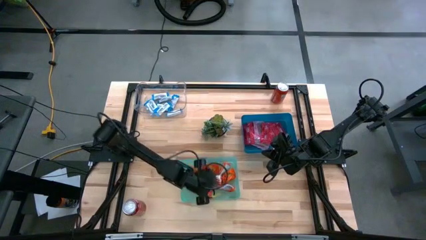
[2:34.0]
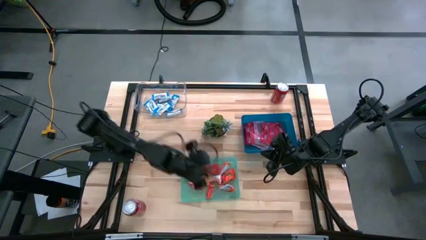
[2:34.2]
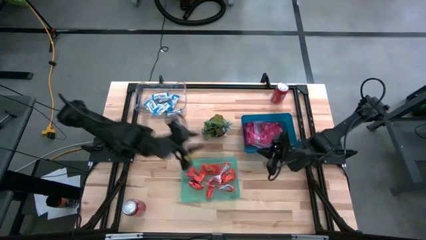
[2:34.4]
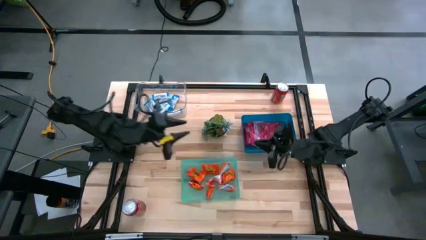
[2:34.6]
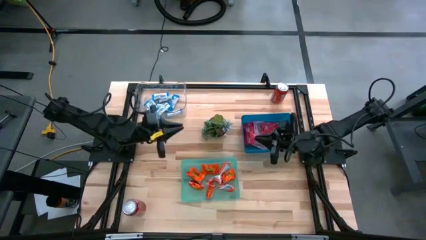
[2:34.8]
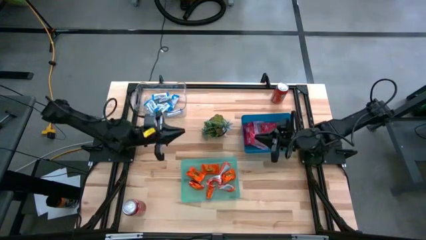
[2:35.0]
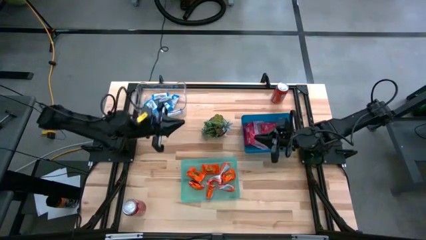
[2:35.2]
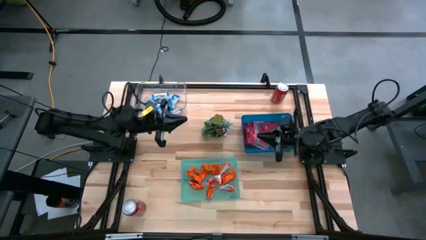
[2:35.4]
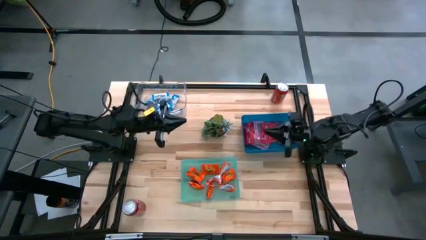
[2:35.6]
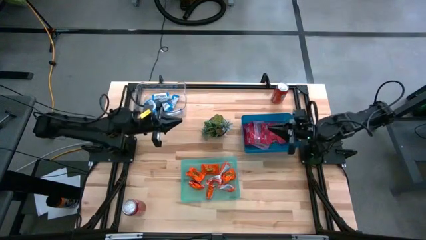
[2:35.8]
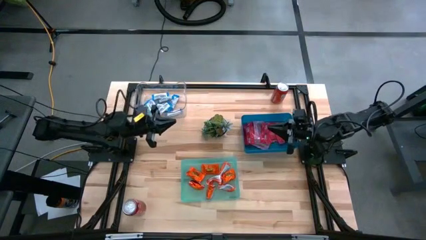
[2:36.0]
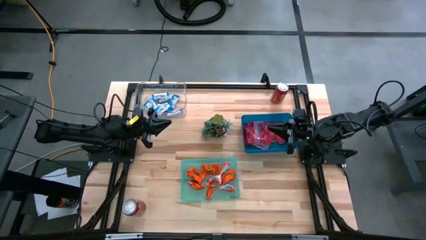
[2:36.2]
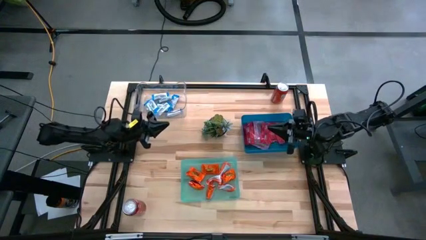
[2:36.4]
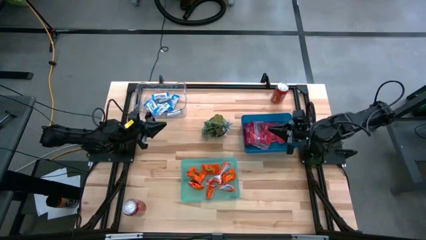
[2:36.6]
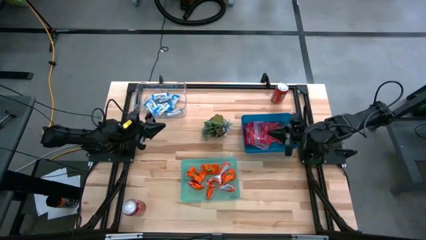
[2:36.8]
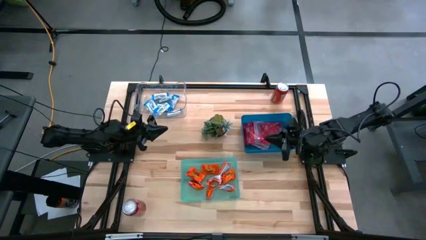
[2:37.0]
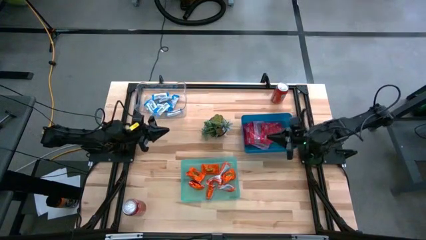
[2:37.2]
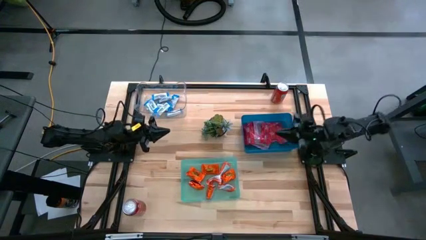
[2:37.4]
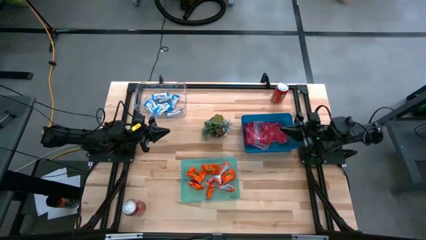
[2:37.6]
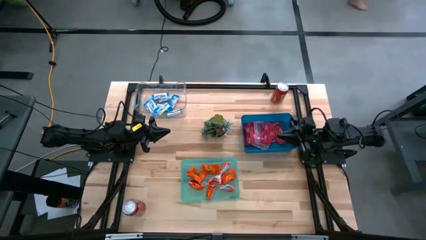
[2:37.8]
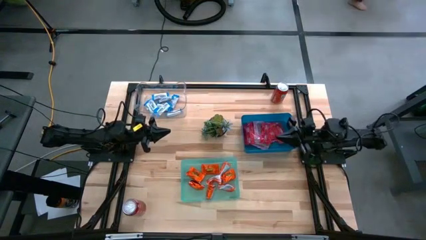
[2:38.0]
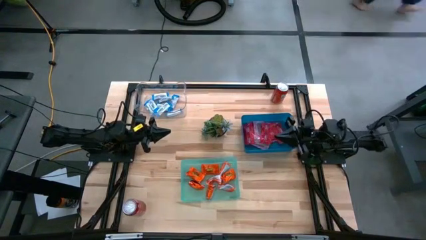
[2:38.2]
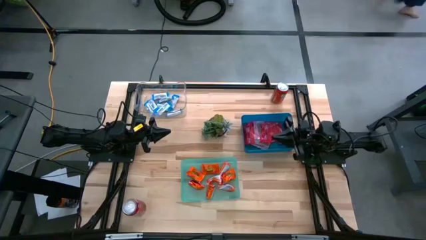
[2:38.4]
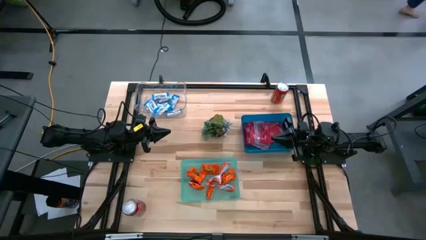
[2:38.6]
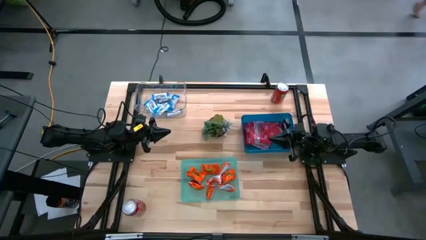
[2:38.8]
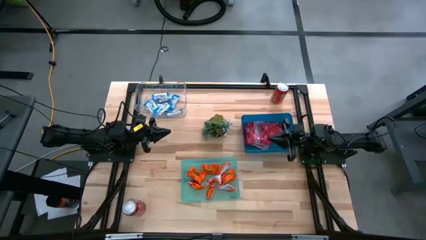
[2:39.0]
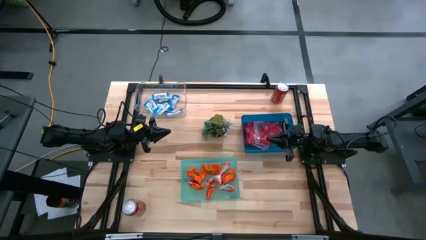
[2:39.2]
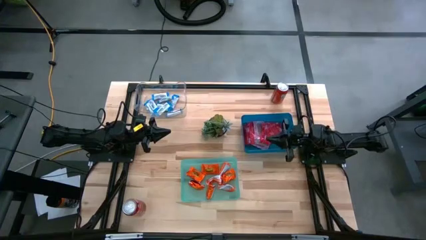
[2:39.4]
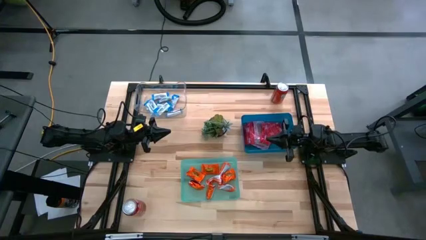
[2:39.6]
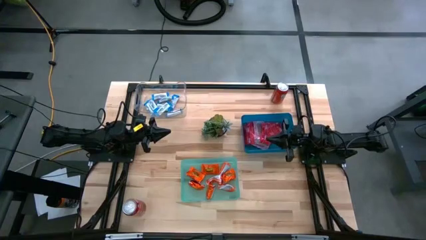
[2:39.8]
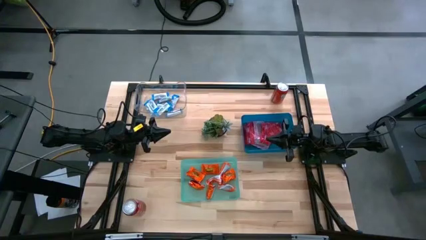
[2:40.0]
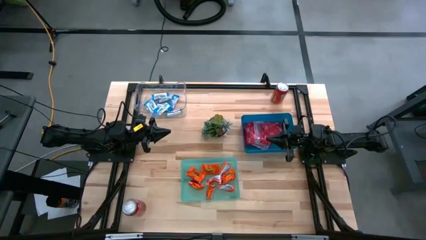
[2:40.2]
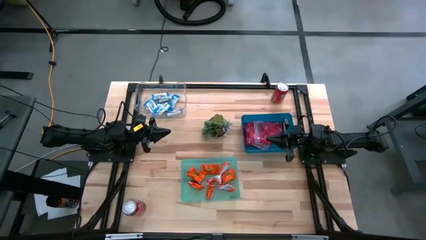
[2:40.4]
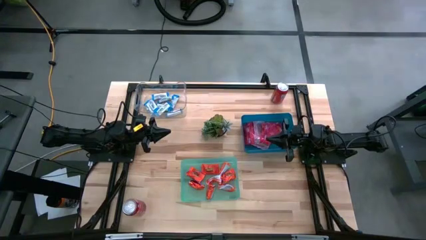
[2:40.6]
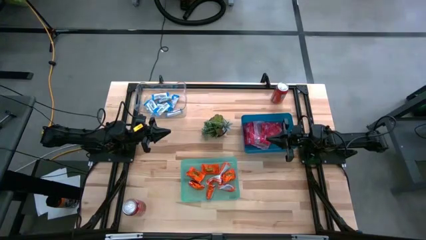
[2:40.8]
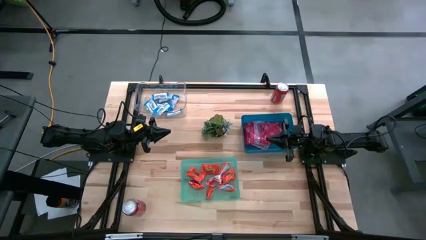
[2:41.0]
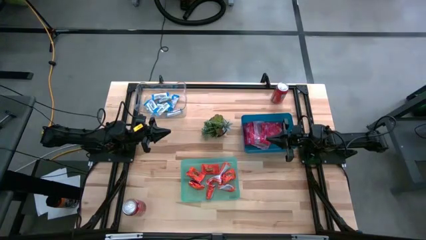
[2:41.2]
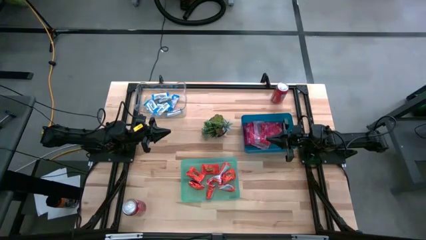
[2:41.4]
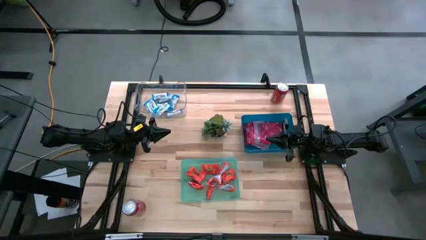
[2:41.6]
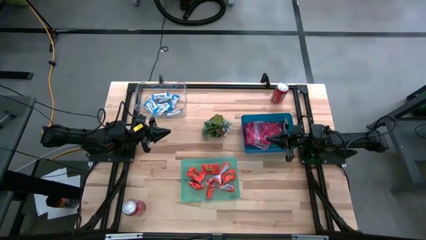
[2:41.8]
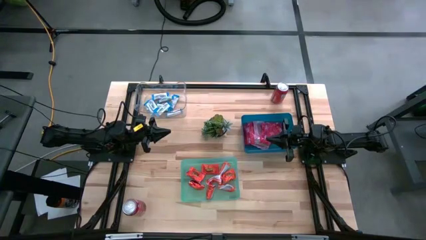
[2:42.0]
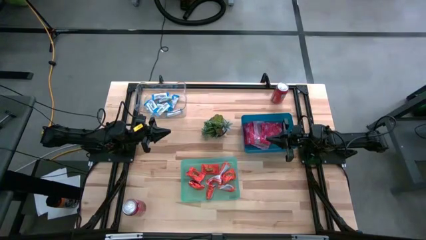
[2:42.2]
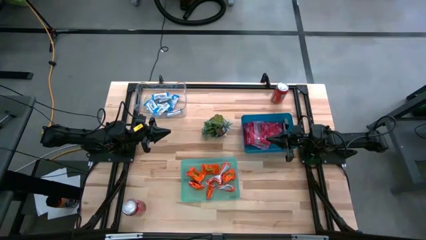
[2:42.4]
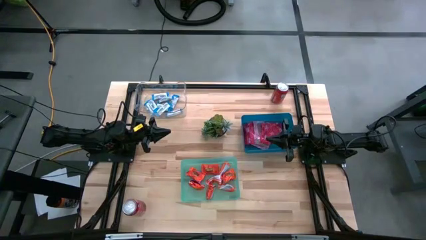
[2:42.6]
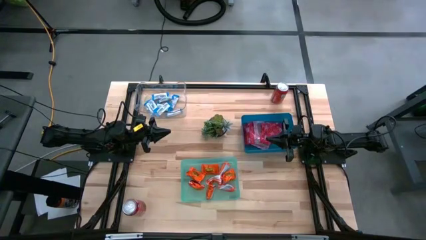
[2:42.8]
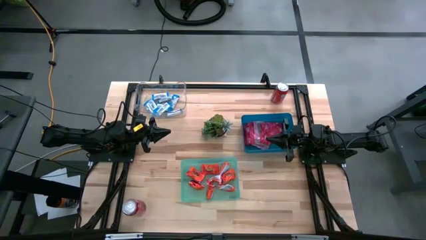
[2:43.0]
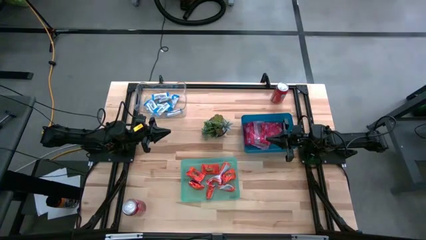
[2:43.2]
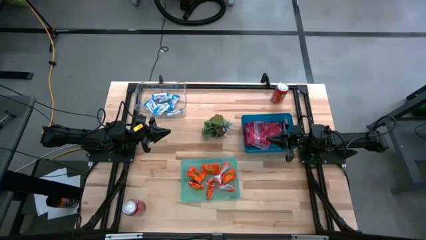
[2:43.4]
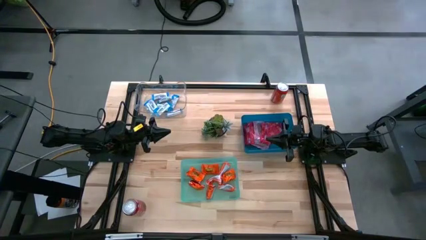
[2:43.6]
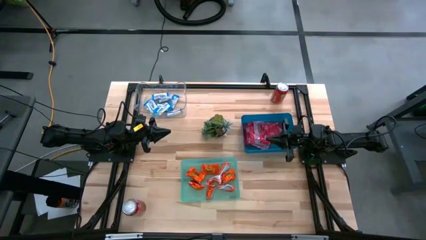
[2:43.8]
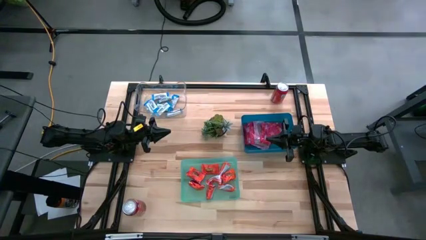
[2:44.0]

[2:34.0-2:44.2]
Task: Sort candy
Return to Home Position

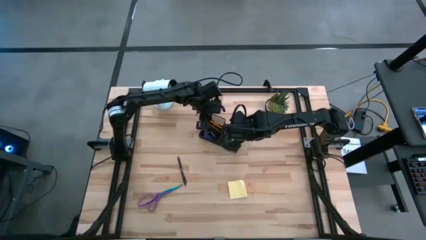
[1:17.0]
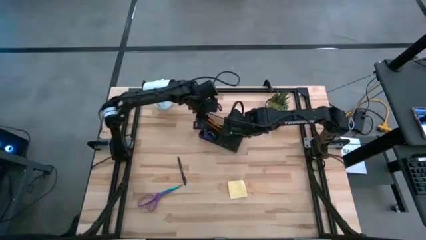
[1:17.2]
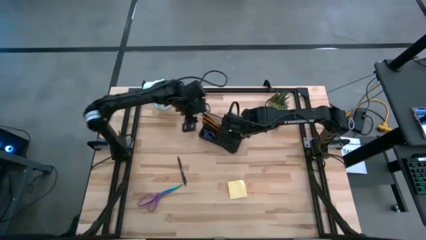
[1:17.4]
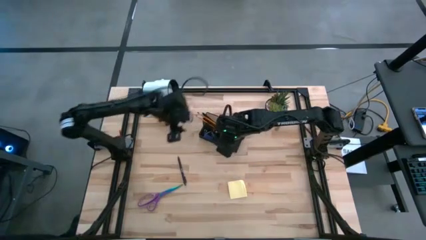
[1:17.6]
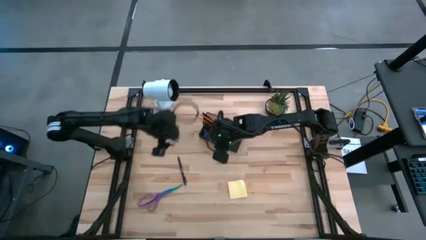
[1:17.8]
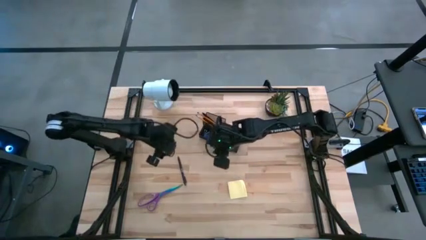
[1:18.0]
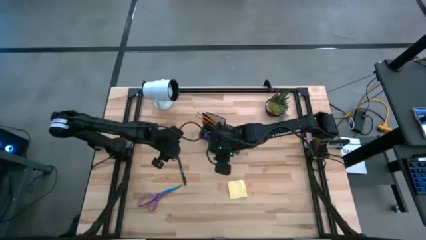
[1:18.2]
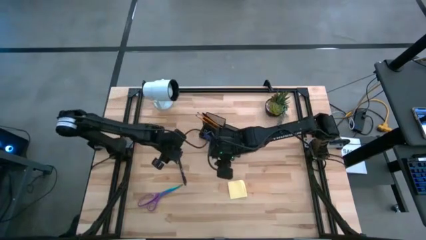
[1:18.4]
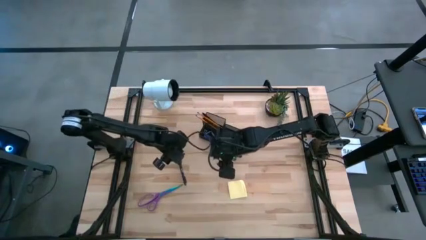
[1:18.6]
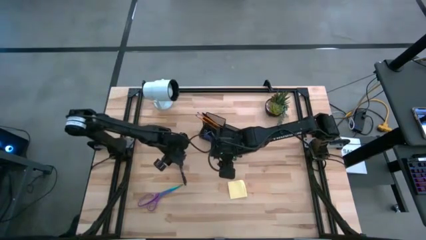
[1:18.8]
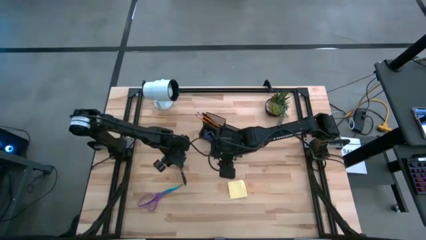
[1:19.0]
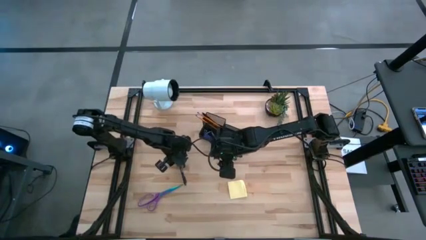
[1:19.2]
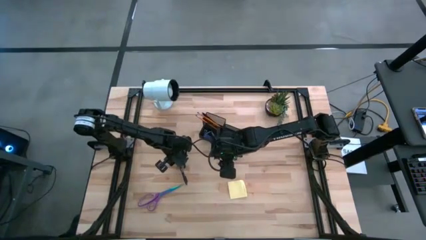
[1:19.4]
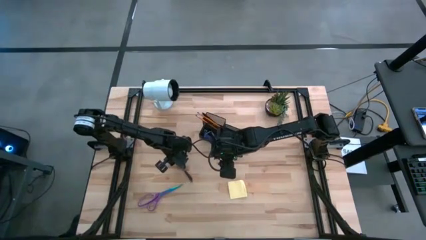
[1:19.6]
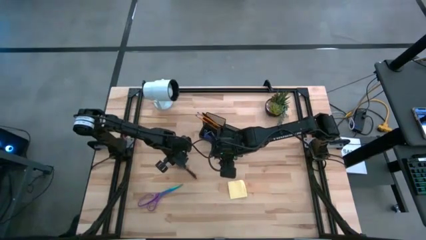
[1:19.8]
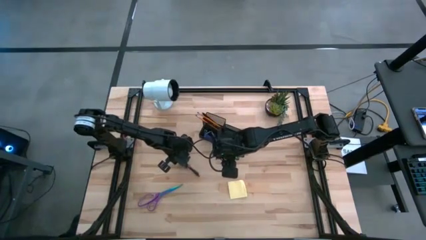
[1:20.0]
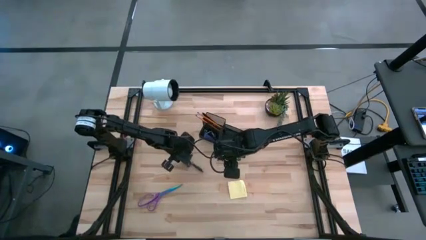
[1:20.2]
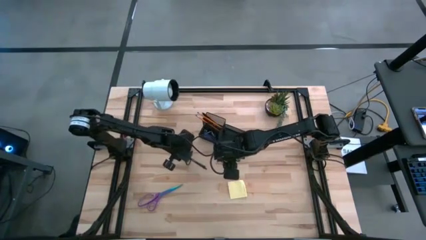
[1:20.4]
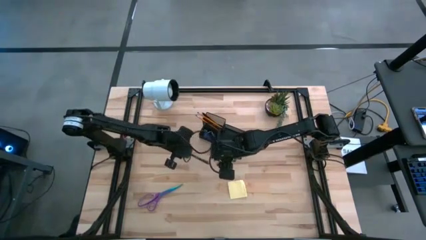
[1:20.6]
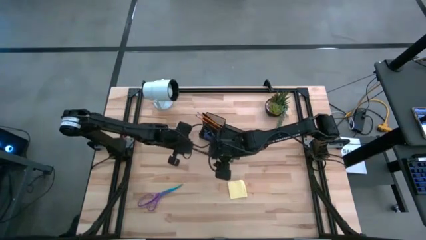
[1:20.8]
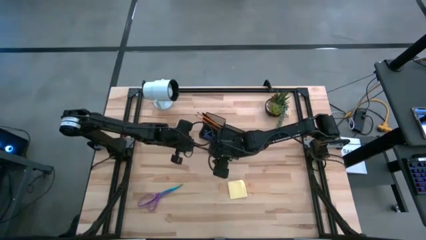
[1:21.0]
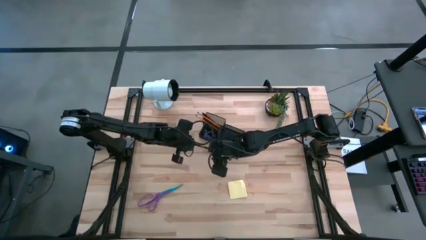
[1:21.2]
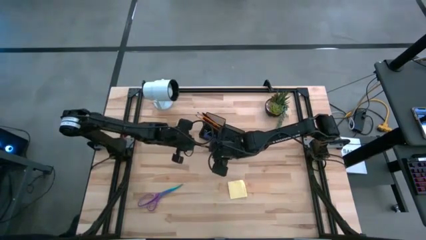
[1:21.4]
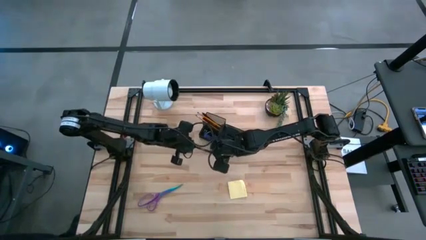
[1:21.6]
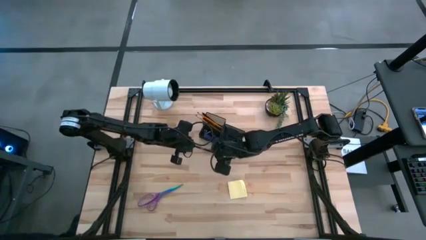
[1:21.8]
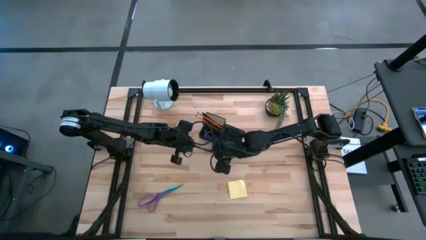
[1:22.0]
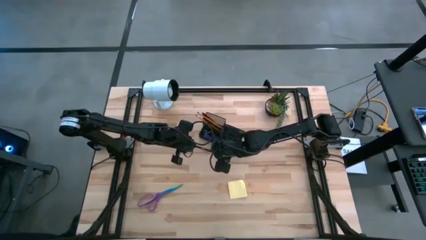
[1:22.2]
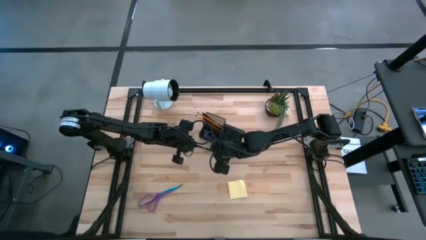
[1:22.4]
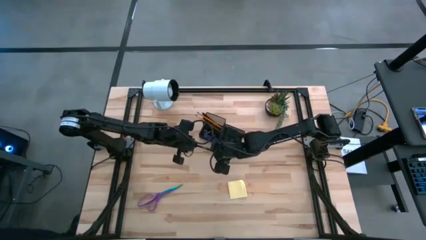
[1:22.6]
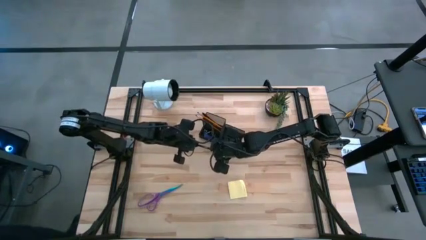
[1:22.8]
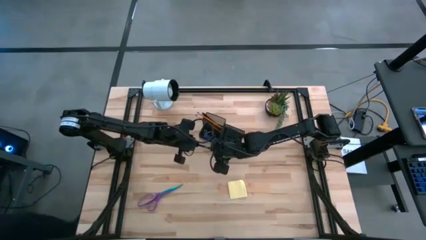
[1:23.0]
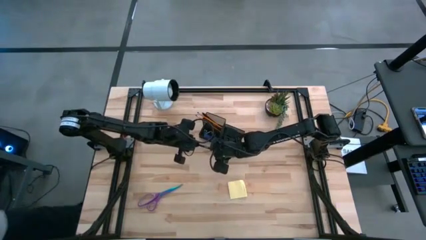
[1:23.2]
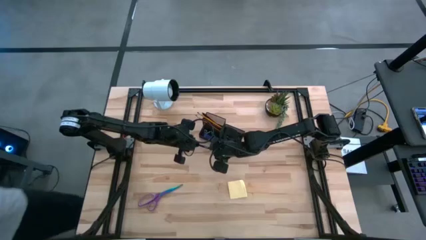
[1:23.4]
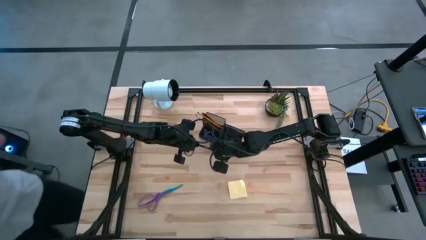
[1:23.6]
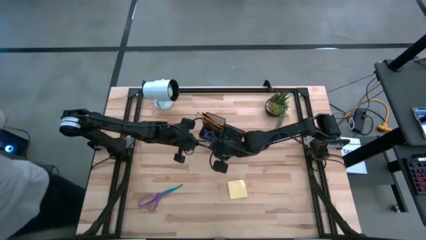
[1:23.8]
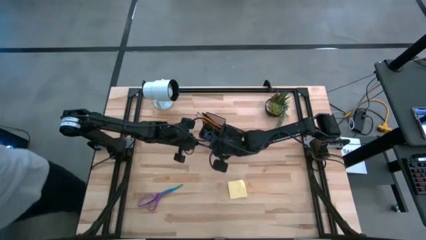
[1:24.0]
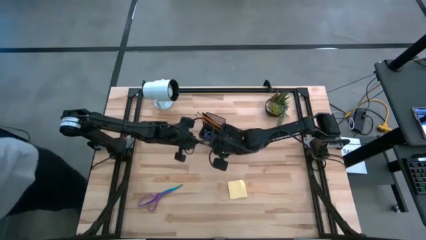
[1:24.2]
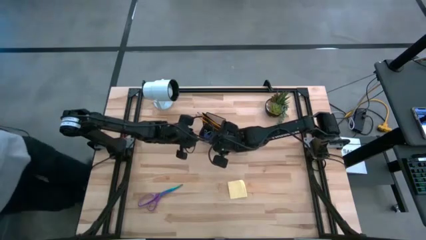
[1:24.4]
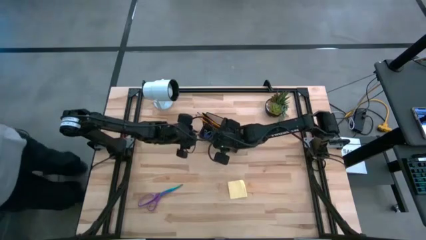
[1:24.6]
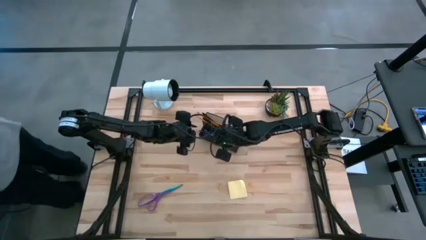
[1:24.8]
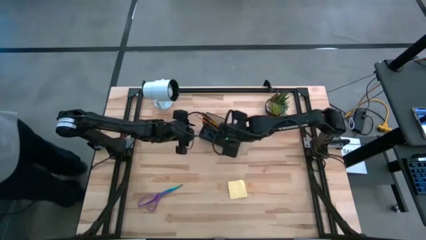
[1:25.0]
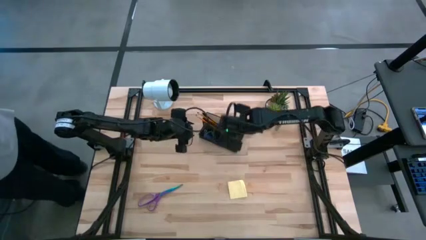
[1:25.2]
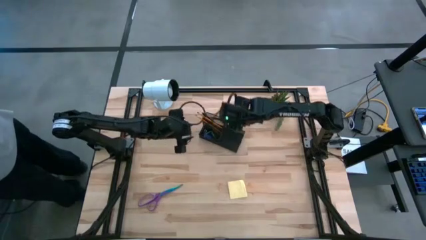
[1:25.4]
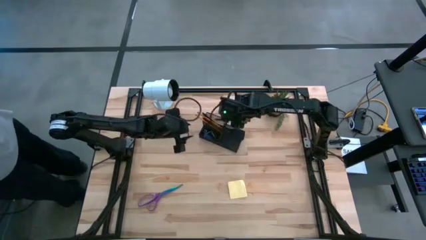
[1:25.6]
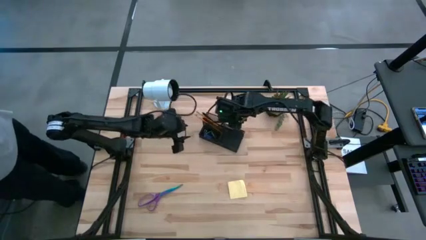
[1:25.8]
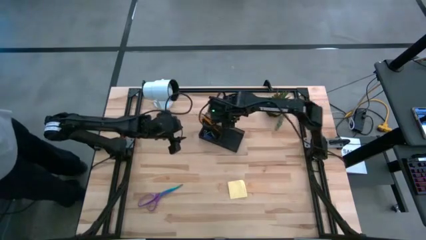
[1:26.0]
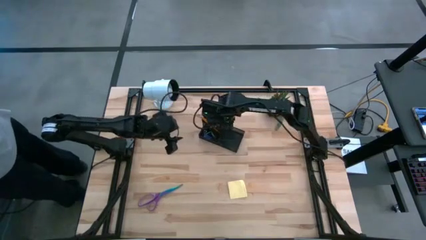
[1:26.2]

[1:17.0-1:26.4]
Task: Pick and place office supplies into organizer
Put the black pen into the black desk organizer
